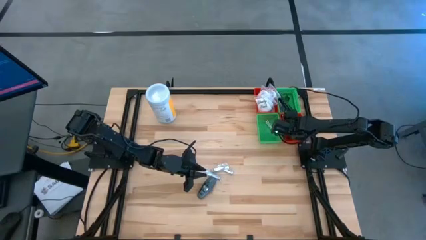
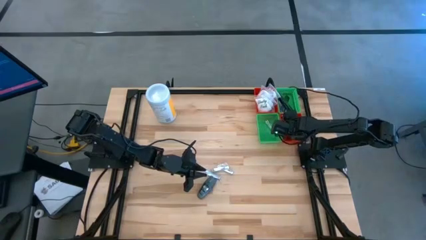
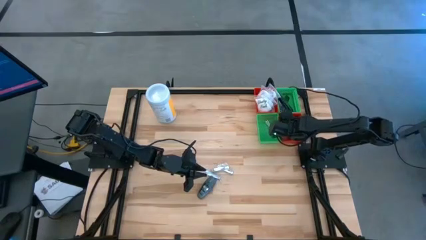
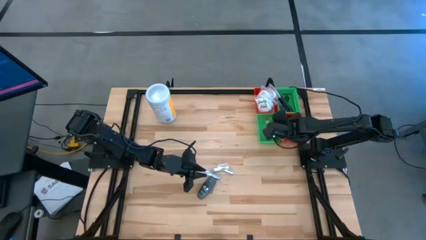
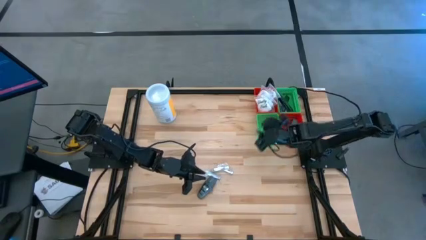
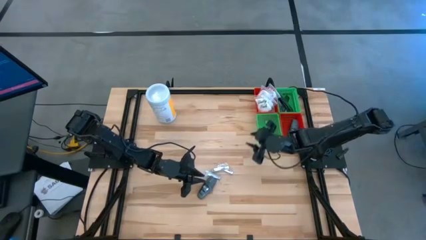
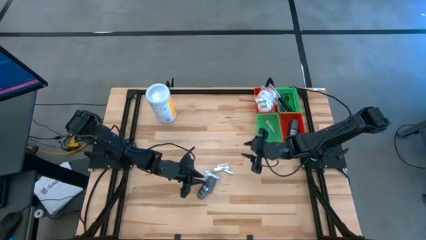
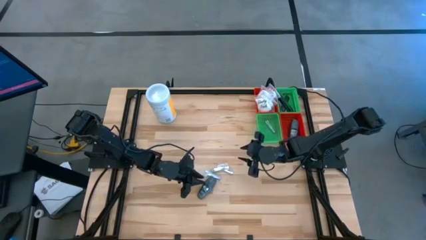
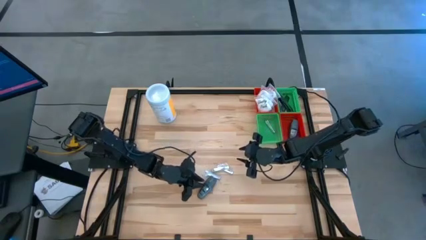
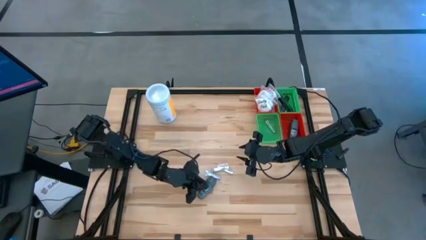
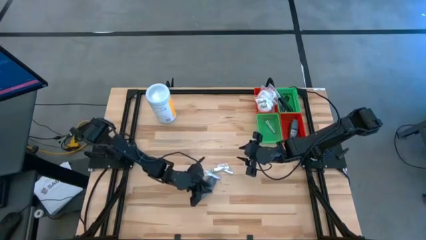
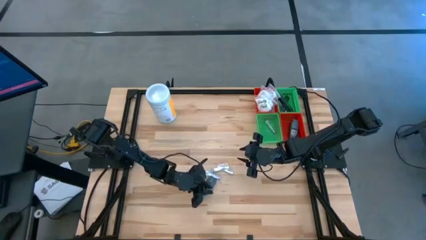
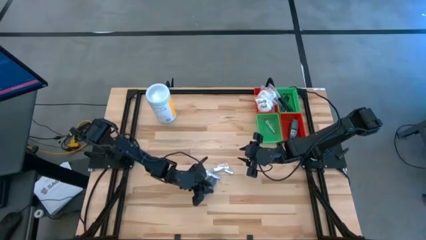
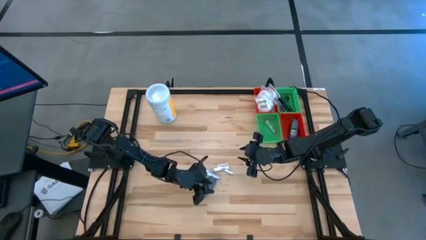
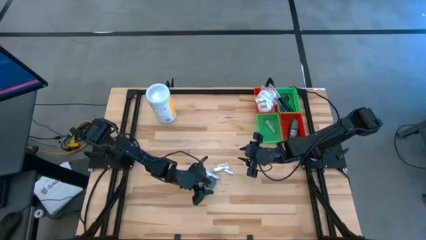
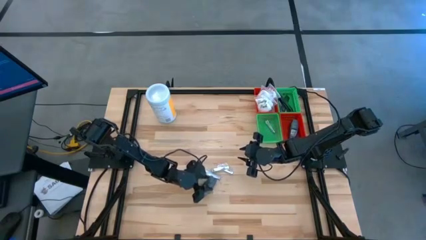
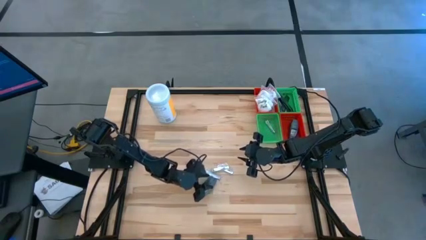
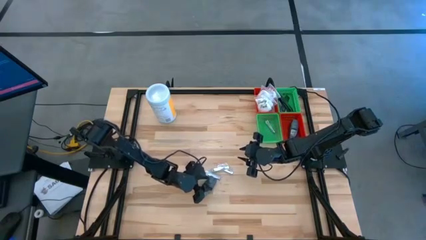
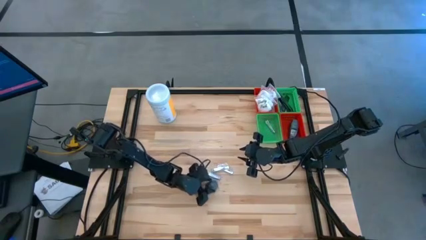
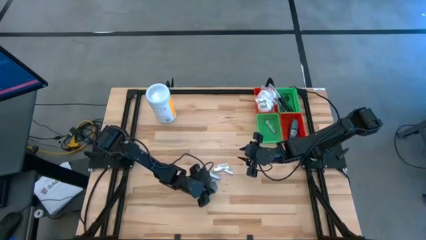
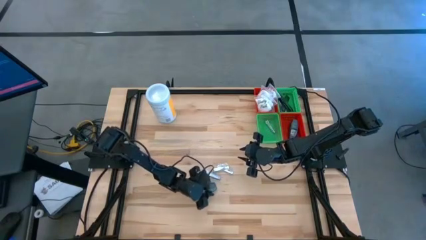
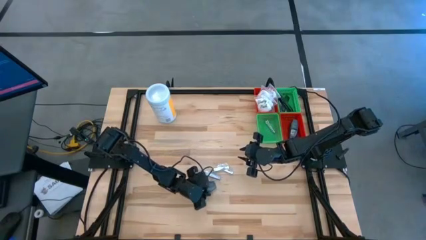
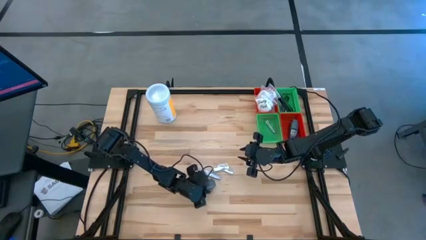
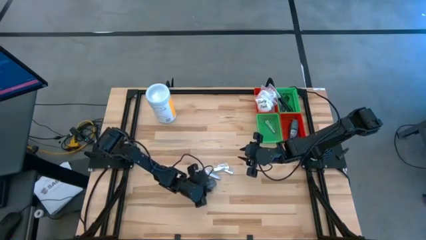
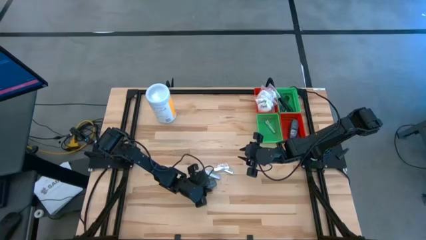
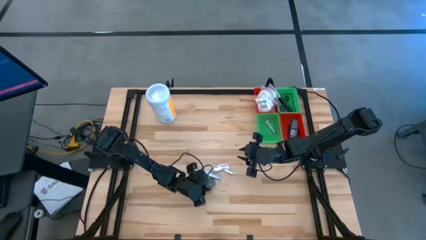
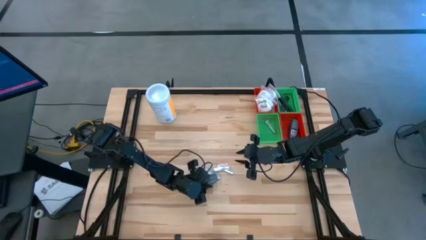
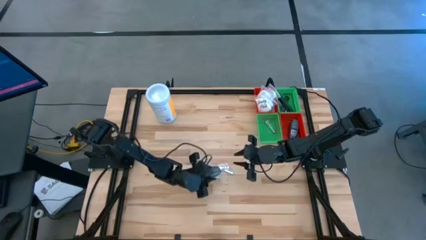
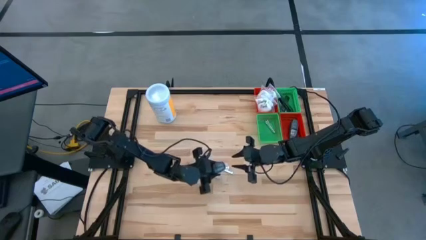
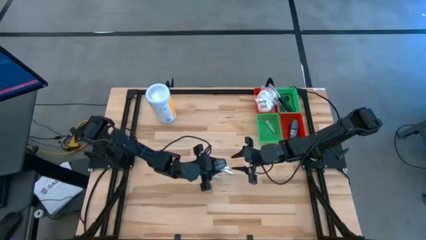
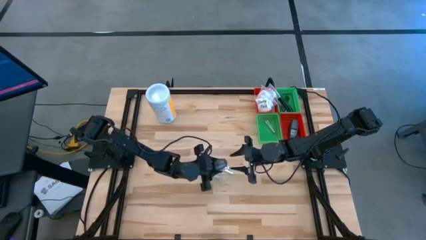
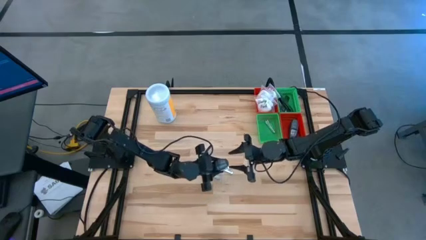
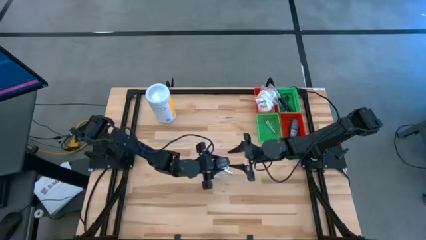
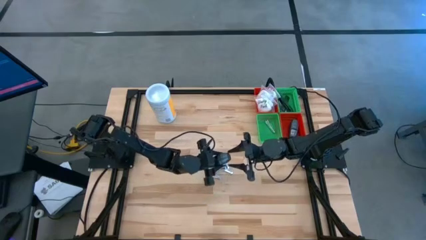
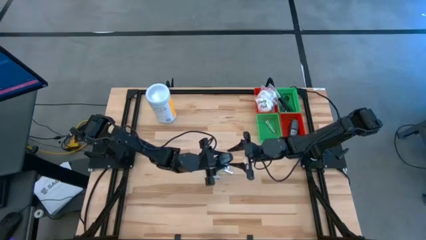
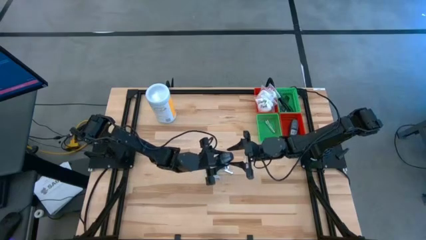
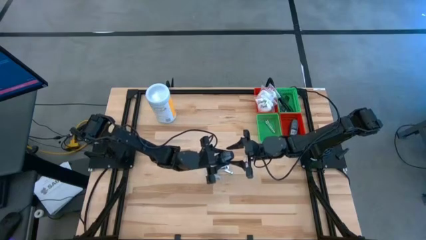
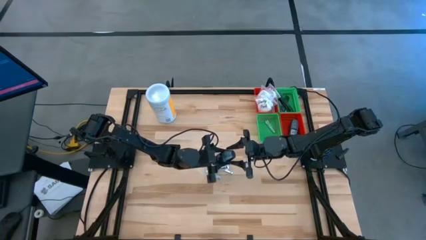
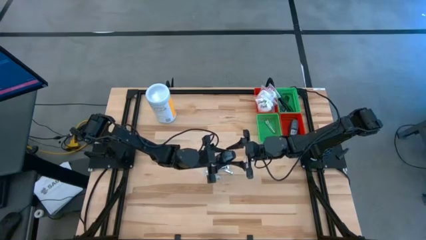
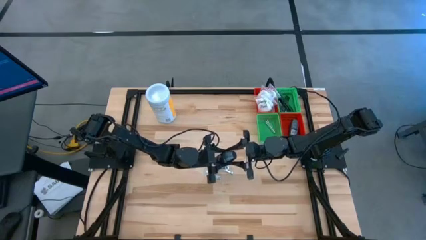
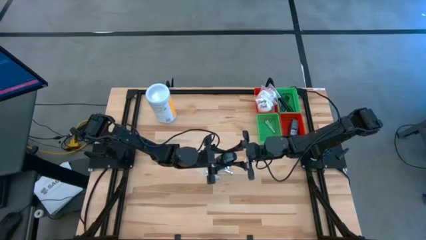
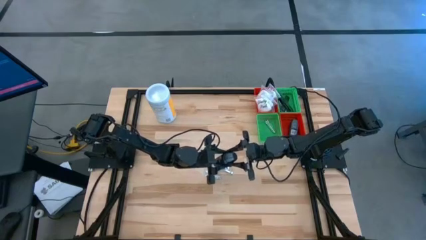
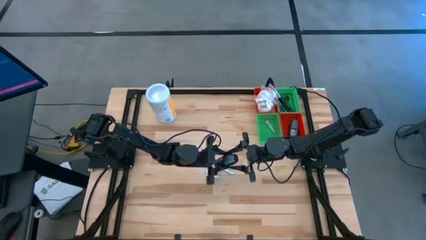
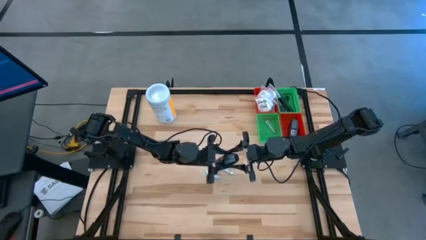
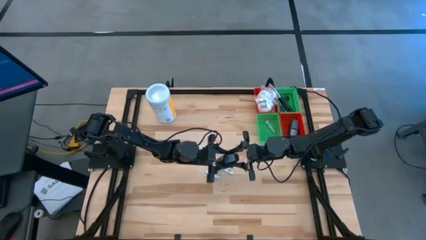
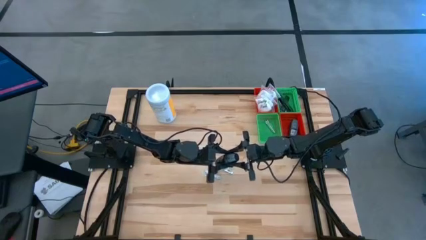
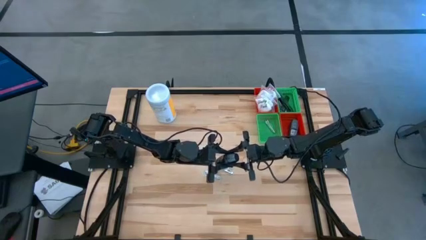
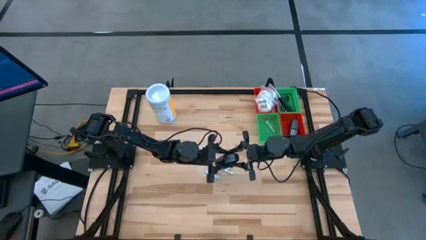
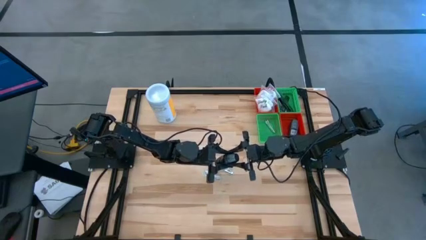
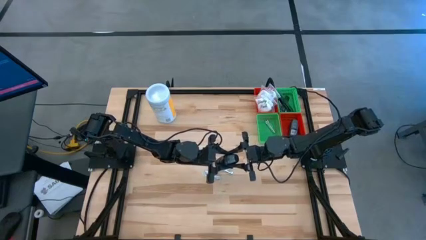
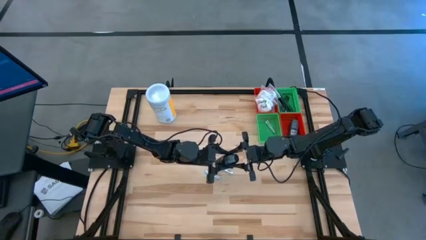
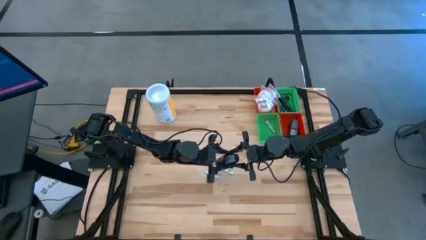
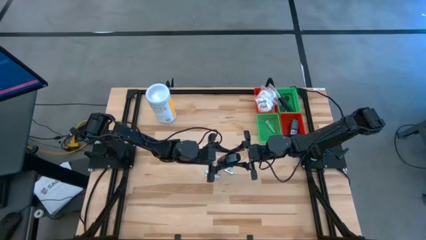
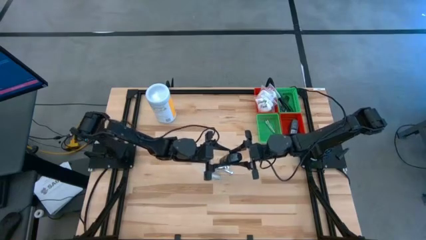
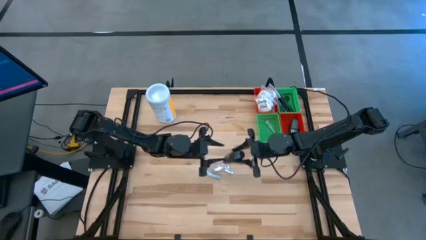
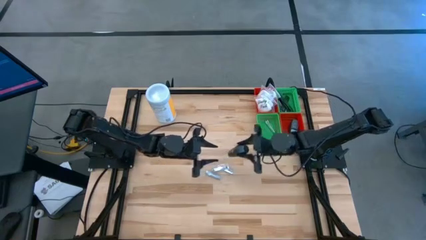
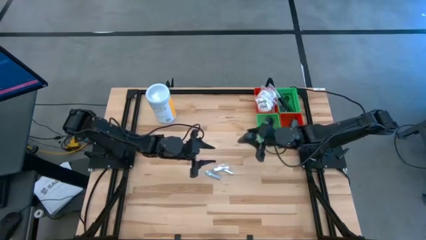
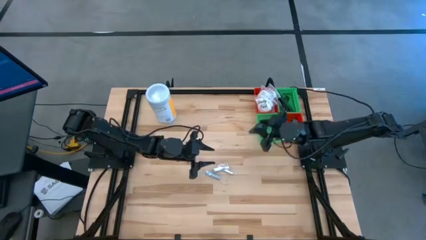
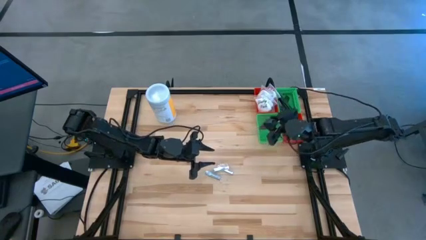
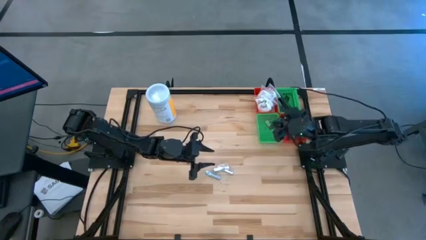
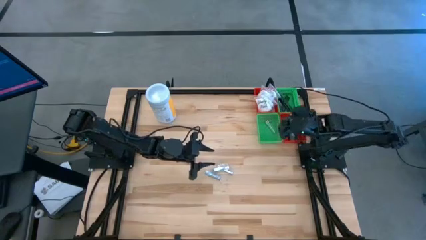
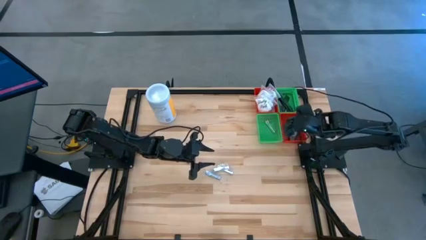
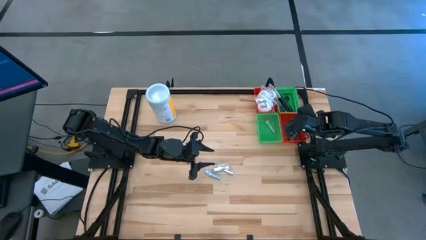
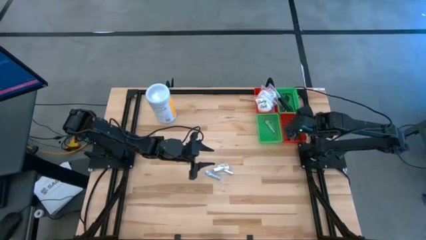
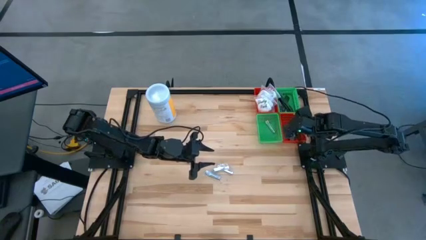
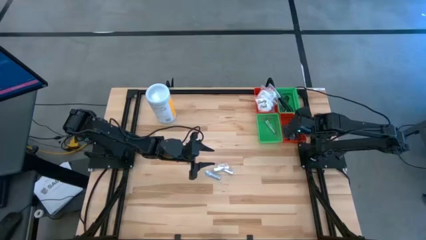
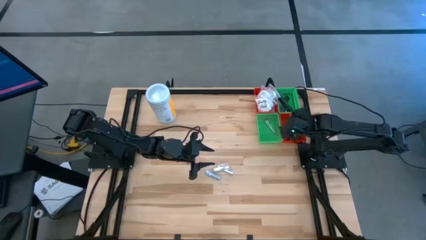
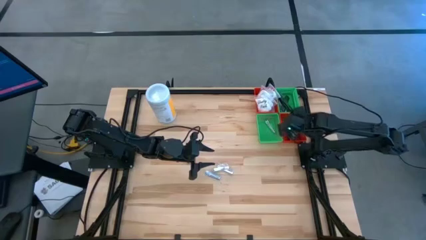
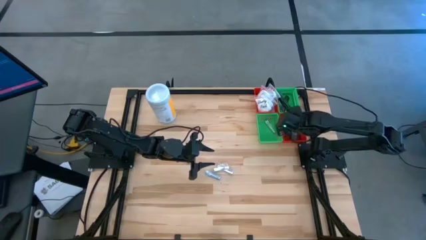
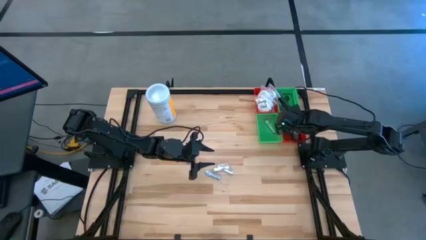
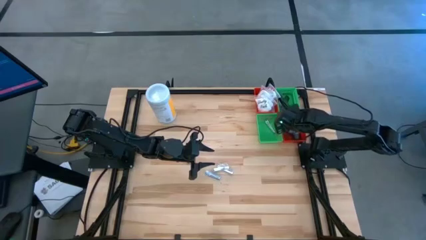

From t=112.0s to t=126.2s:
Task: Pick & Place Travel size toiletries
Put the gray deodorant into the bottom red bin
